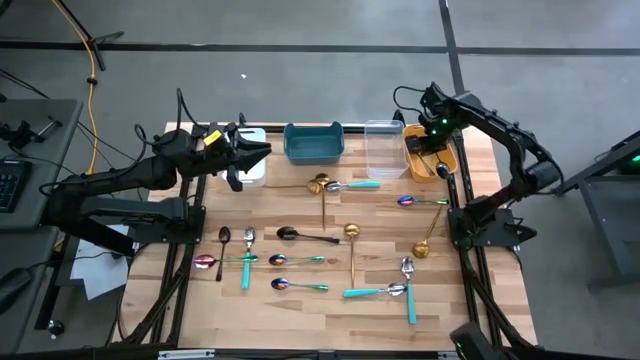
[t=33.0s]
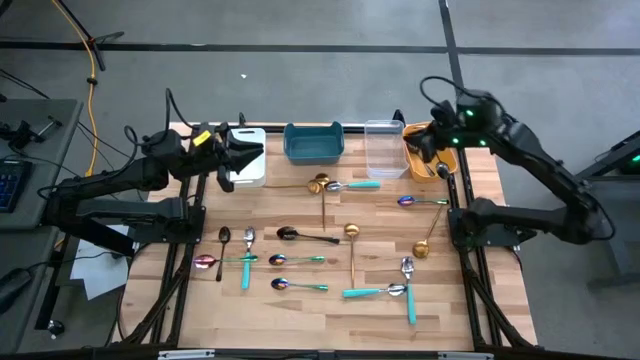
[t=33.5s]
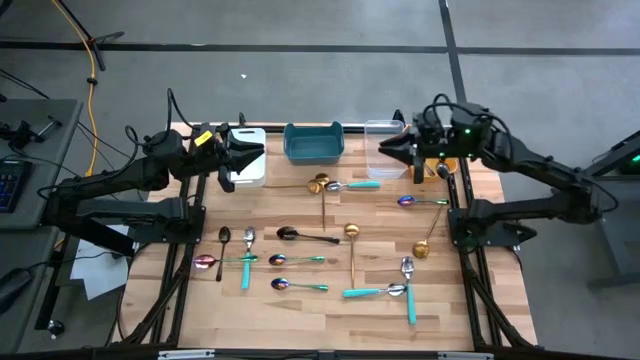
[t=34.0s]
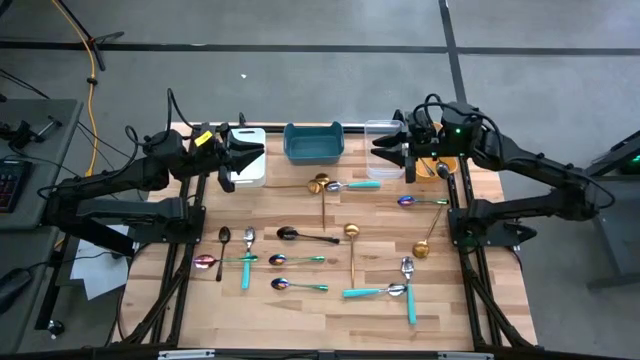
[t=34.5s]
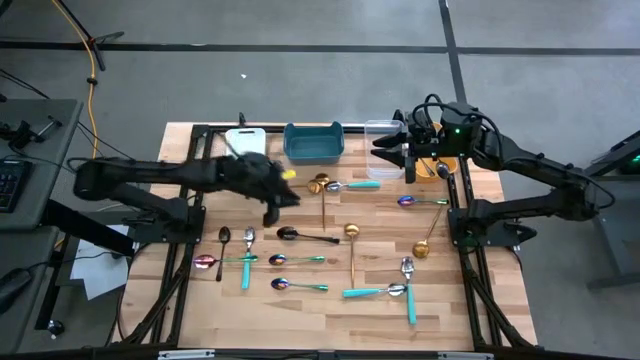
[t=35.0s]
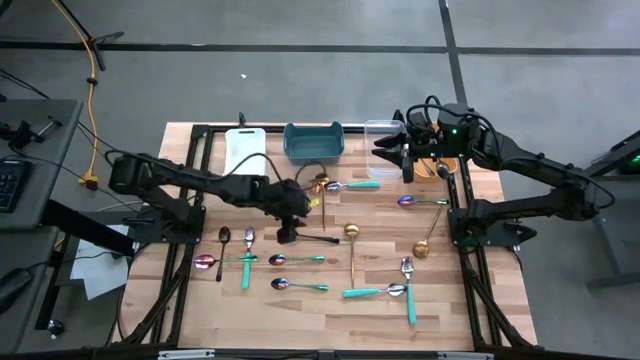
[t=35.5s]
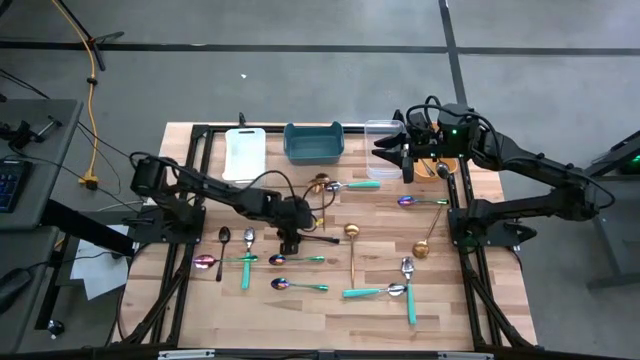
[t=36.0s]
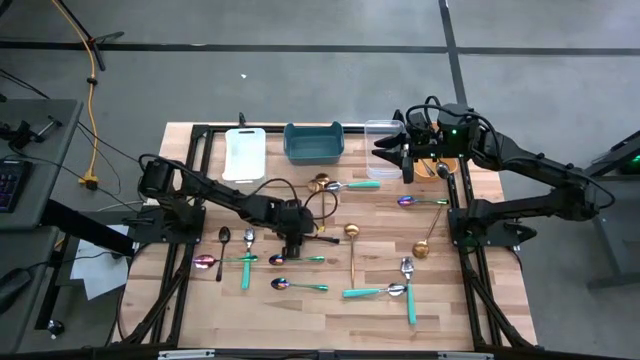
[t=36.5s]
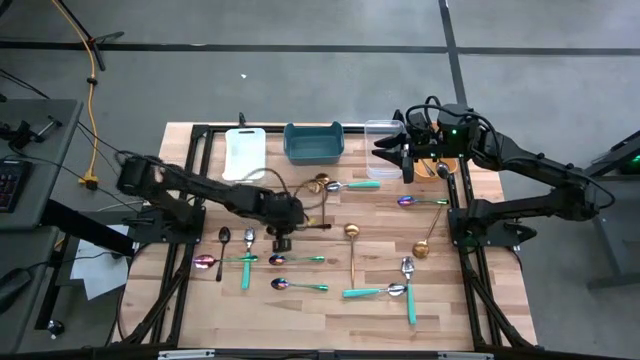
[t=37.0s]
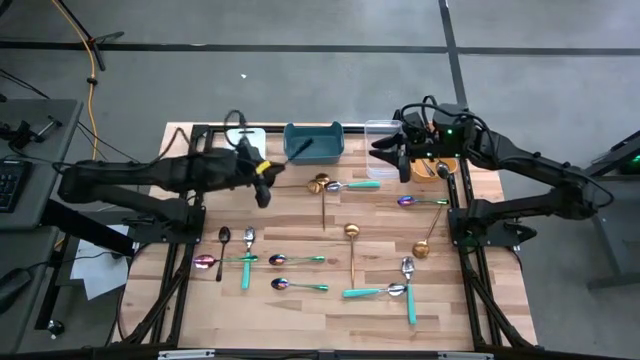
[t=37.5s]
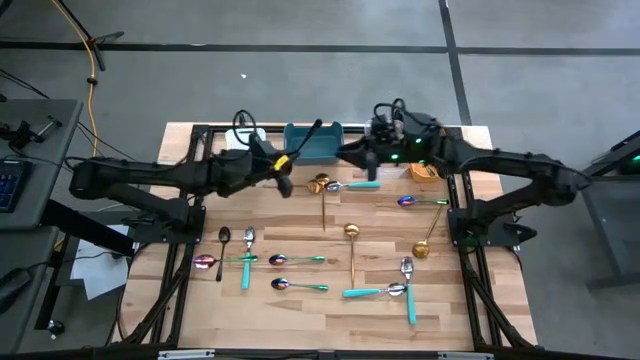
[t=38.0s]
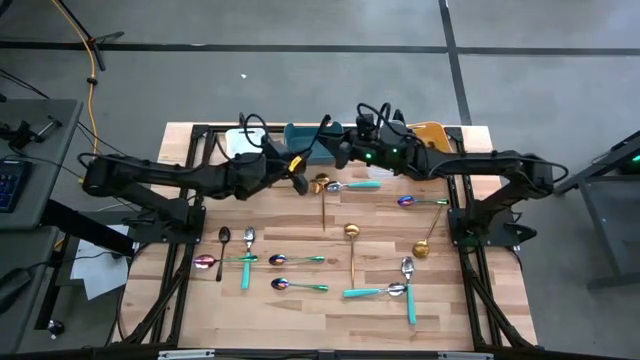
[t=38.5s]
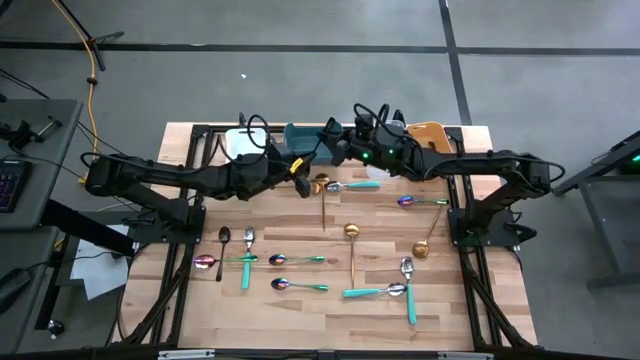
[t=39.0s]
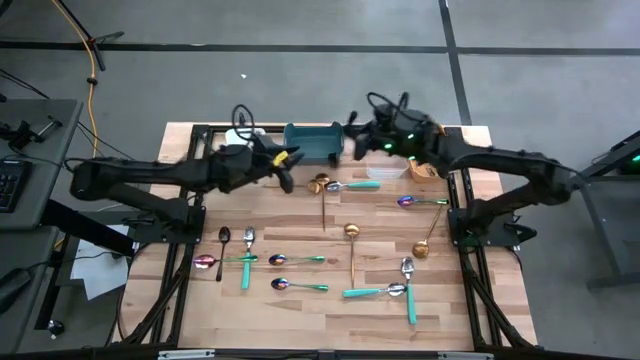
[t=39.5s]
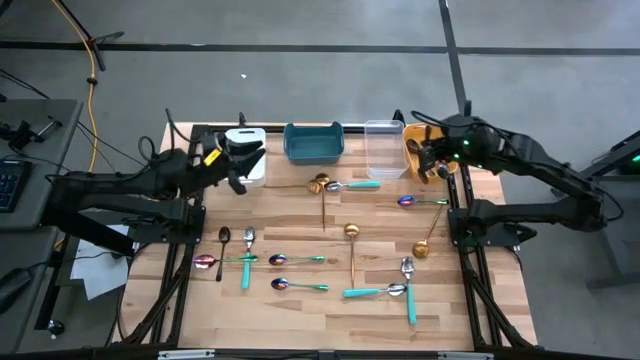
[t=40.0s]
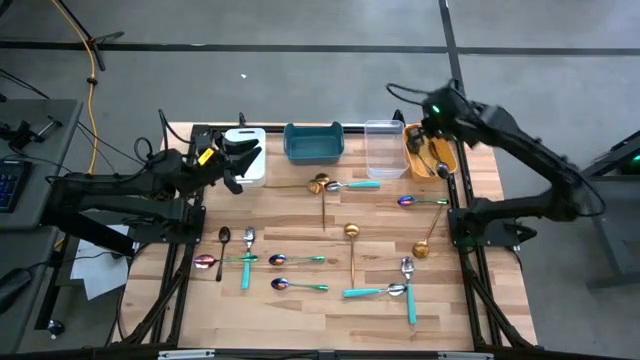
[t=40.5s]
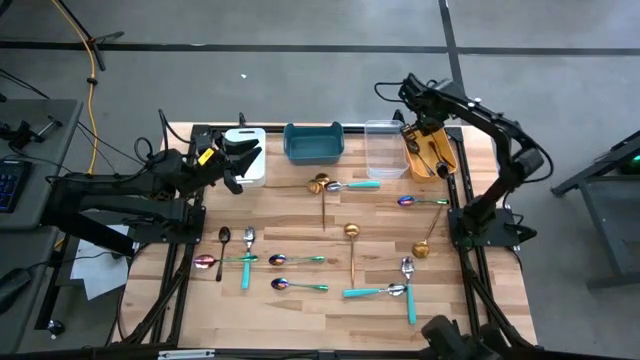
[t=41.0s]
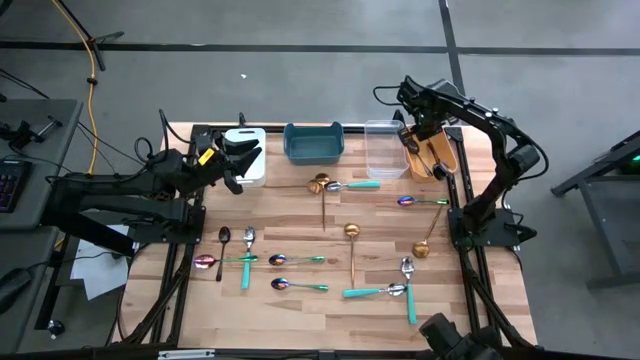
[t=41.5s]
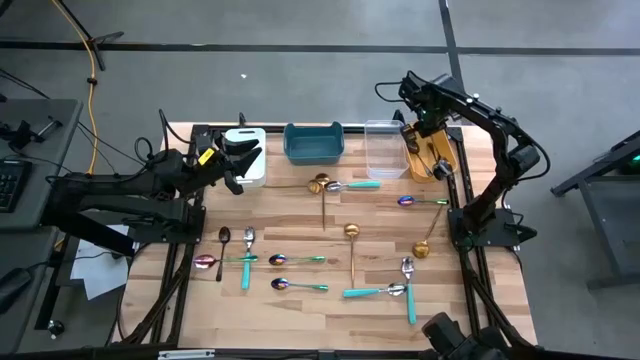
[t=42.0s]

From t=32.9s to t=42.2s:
Task: Sort silverware by color (type)
Put the black spoon into the yellow bin

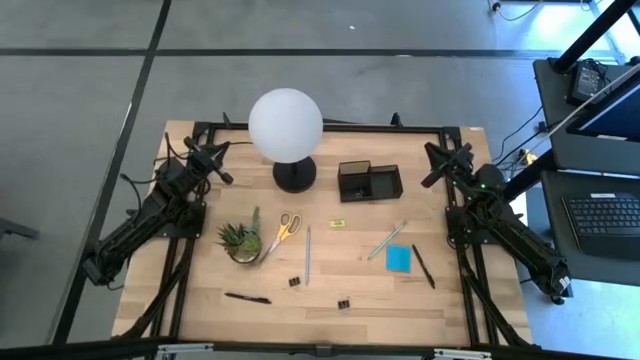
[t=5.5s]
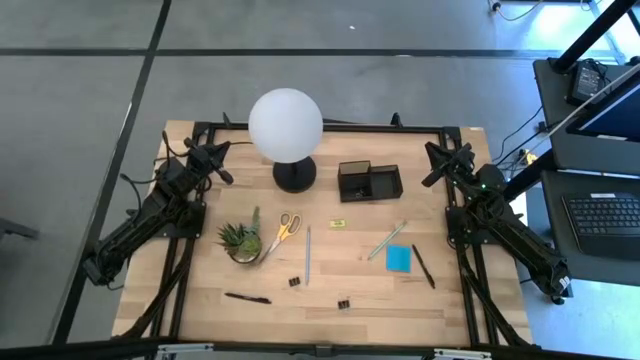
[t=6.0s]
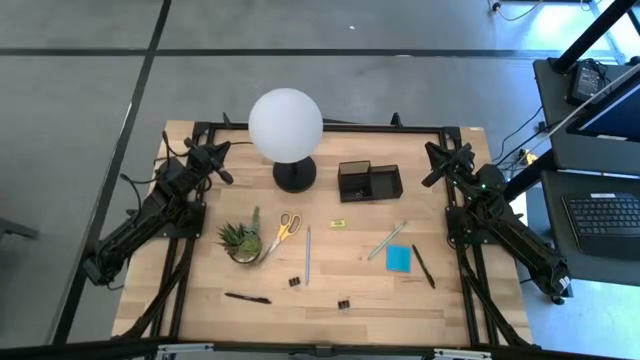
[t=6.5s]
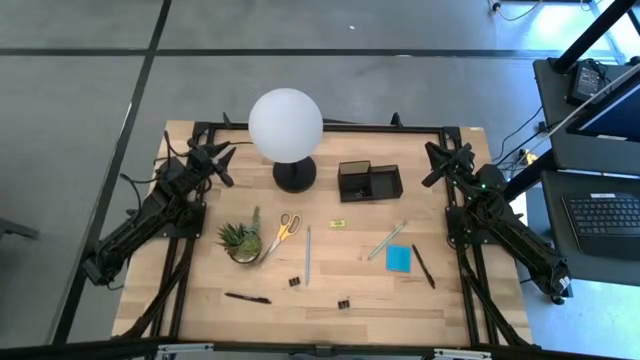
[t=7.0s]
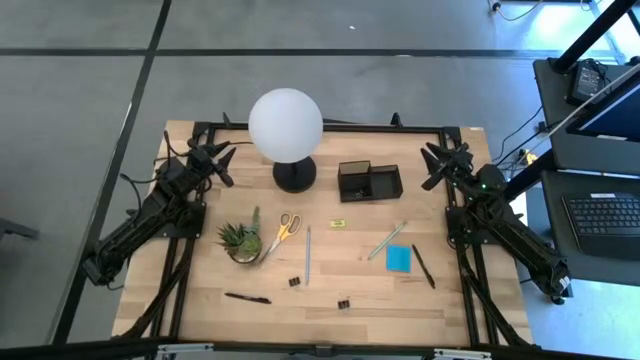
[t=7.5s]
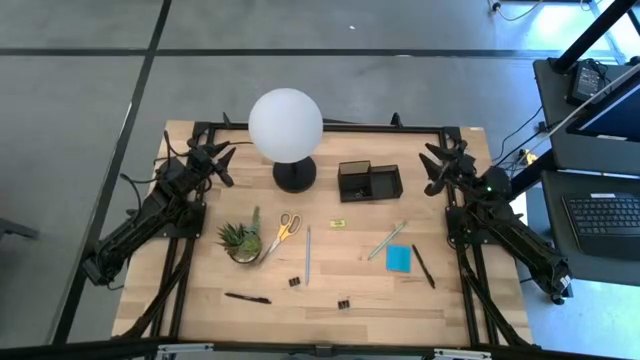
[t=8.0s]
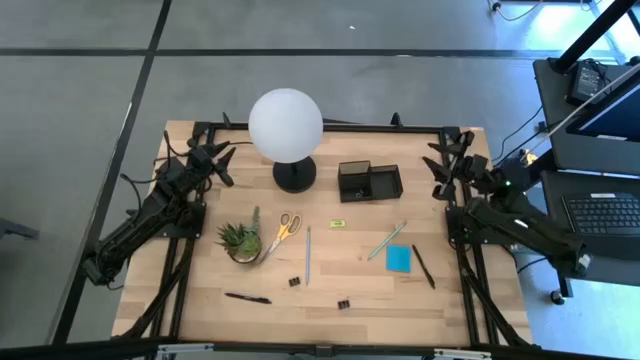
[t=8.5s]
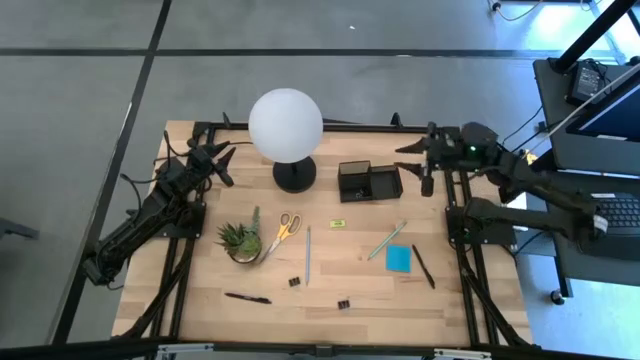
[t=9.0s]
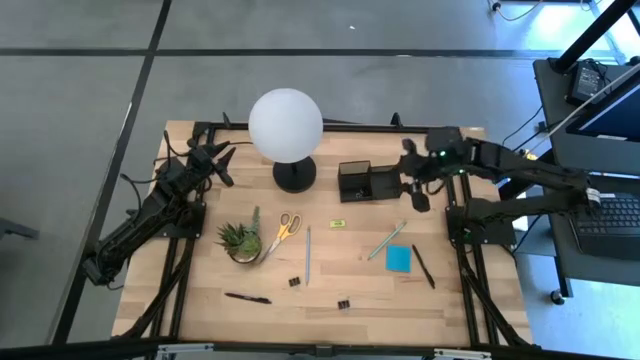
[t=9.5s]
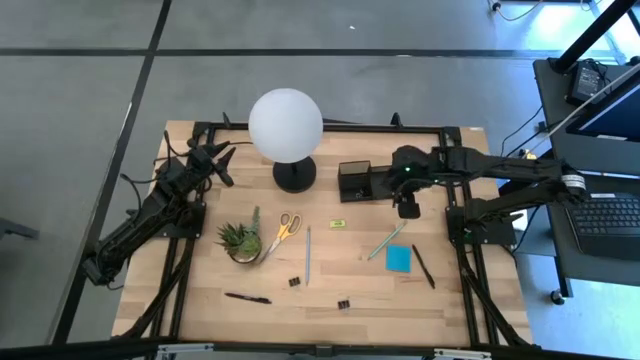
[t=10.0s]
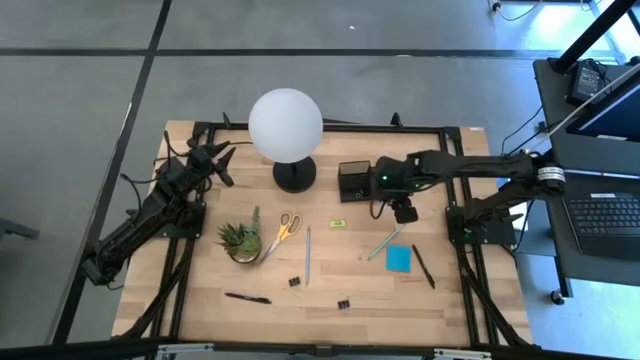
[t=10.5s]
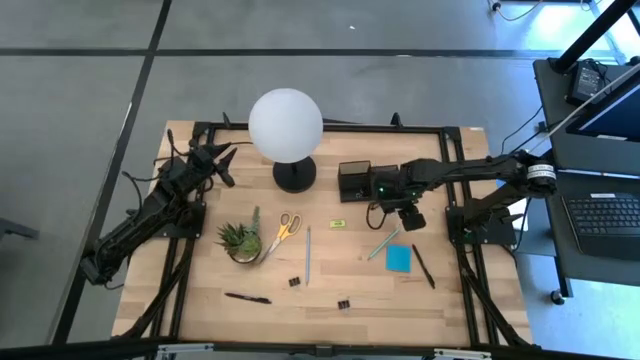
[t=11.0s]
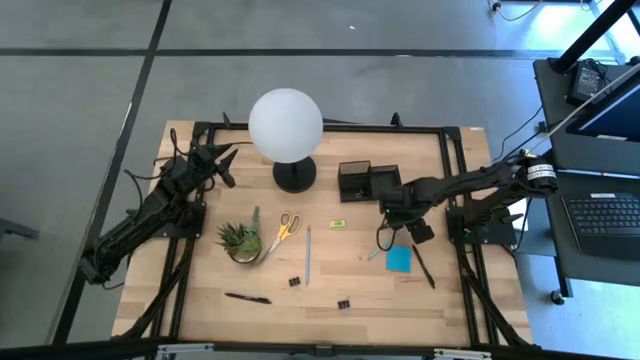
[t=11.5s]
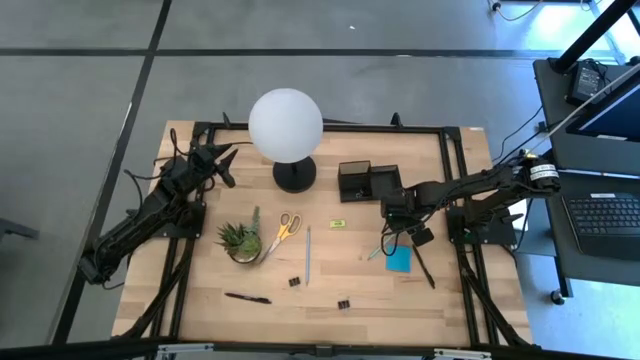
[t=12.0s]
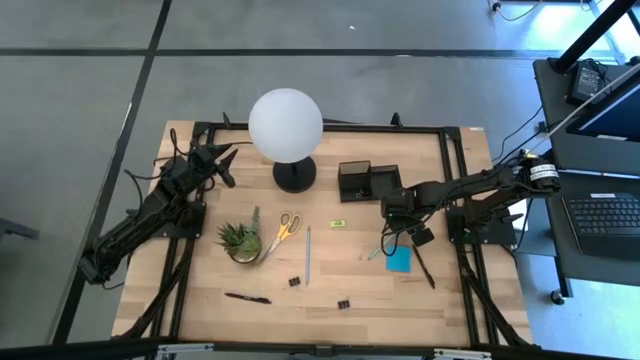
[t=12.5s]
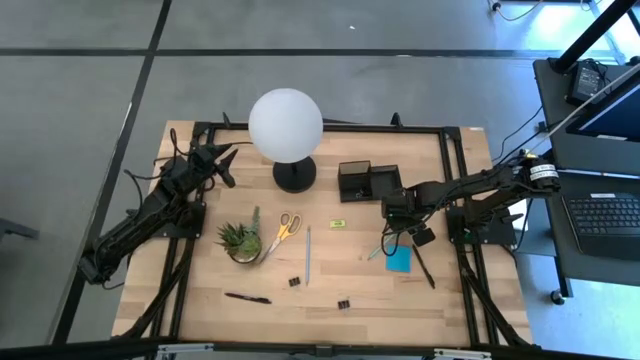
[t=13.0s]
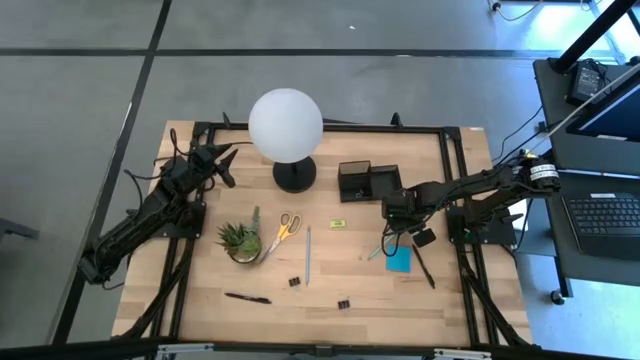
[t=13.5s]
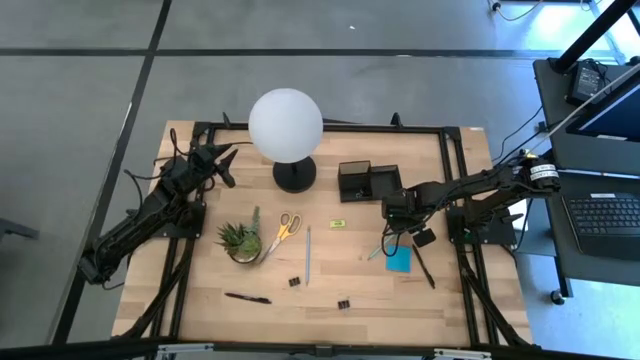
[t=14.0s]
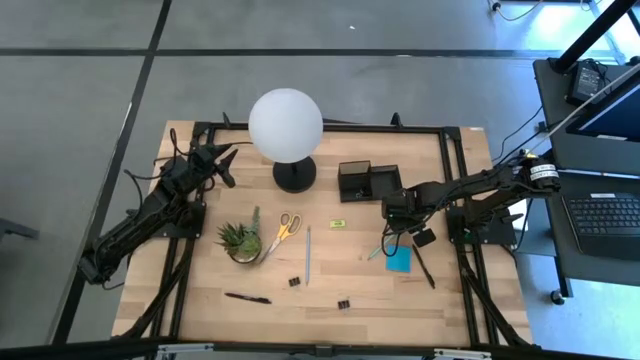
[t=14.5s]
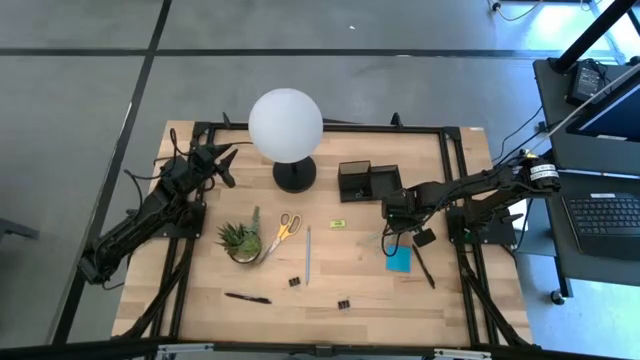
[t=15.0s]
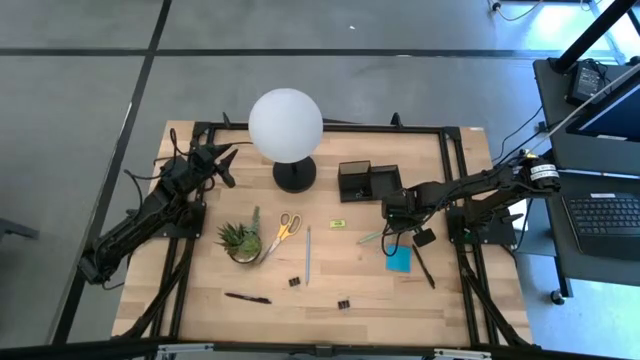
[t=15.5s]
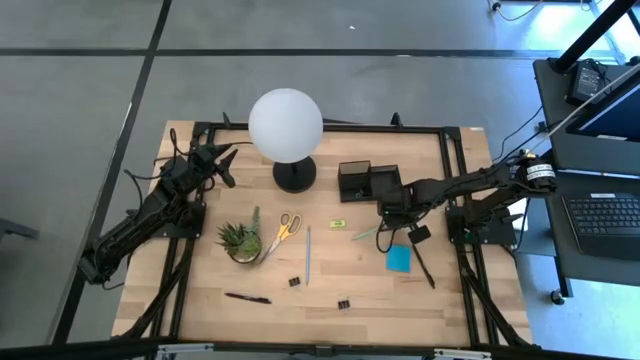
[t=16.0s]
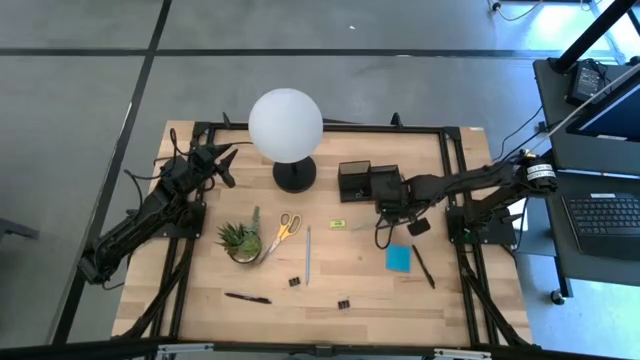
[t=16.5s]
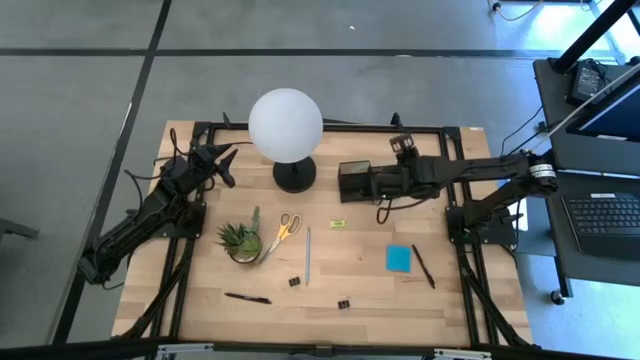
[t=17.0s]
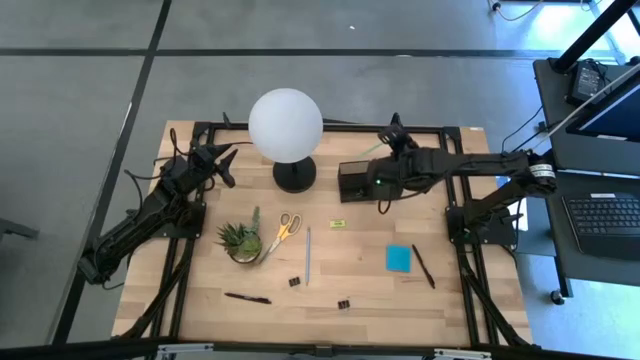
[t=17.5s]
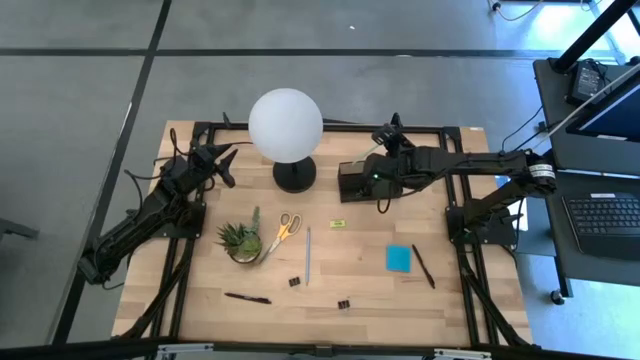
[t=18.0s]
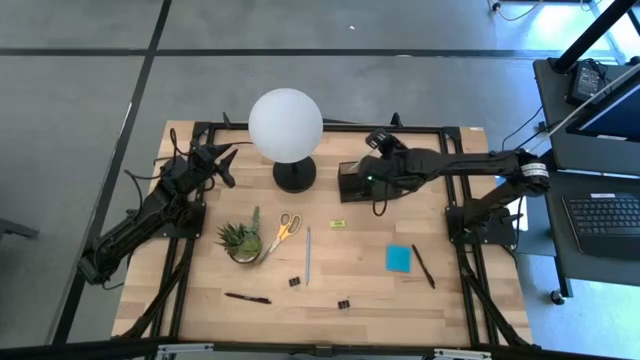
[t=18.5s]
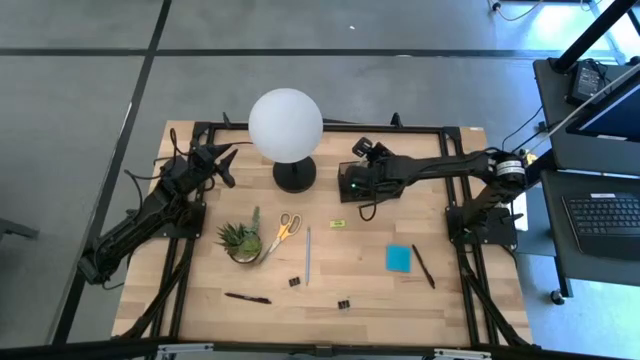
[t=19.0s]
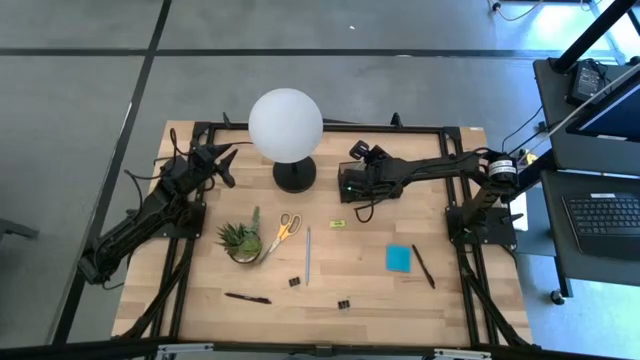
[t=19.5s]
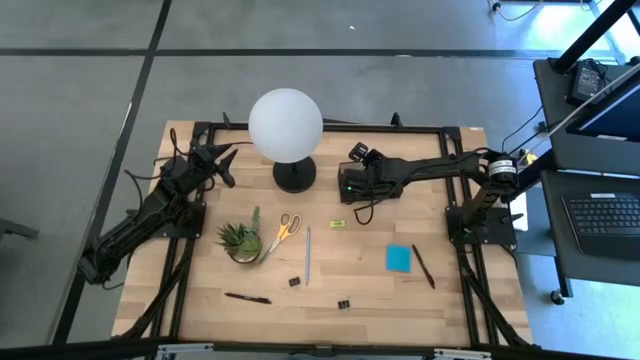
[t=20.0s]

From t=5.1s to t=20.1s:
Task: Pick and place office supplies into organizer
Put the light blue pencil into the desk organizer
